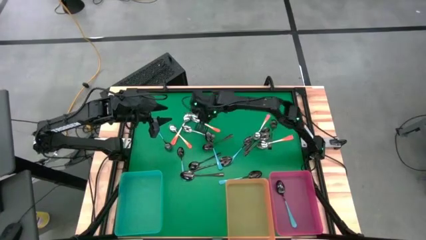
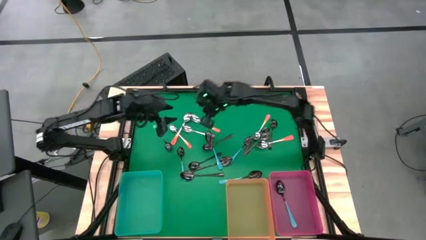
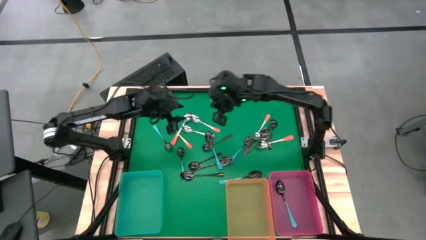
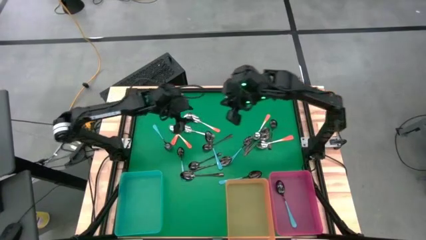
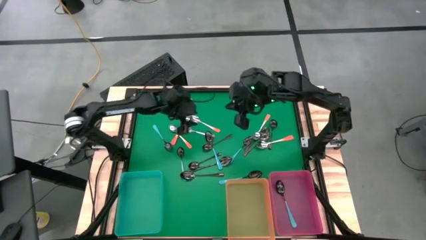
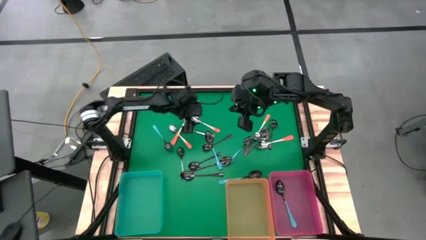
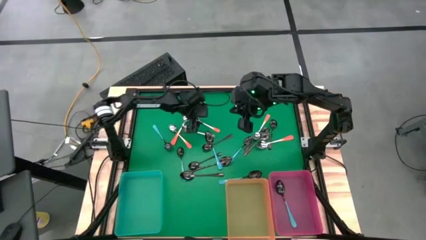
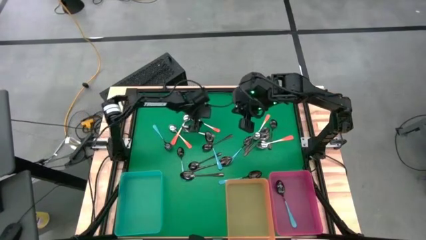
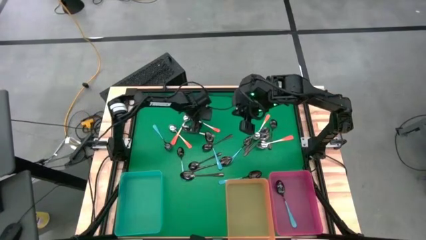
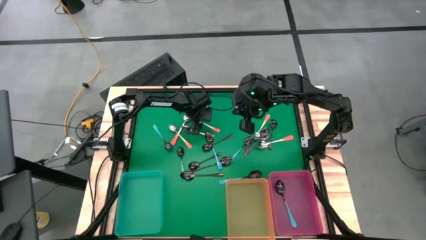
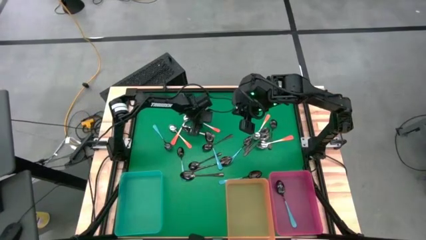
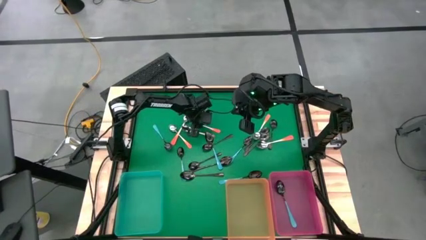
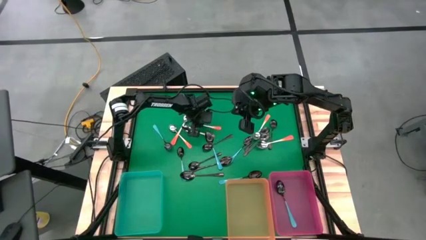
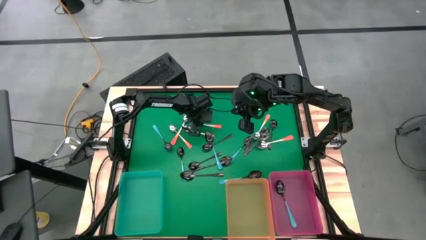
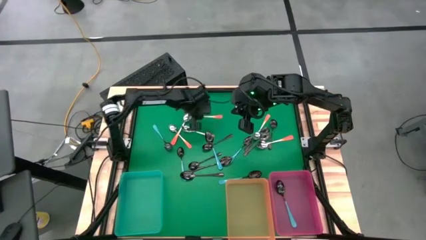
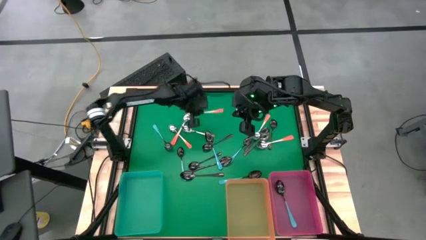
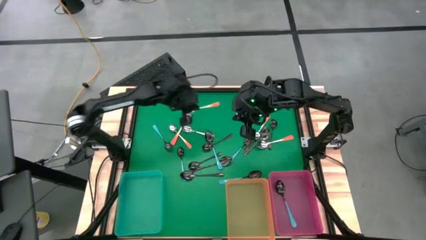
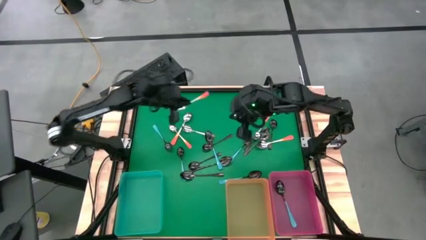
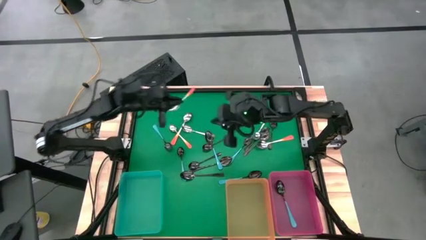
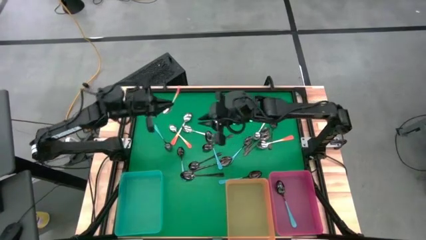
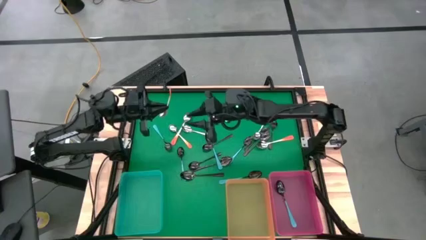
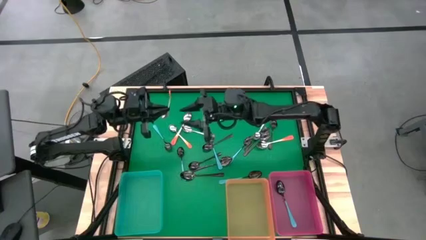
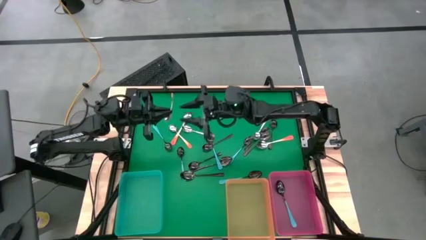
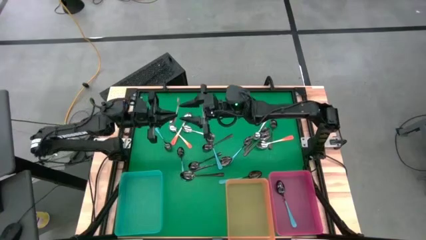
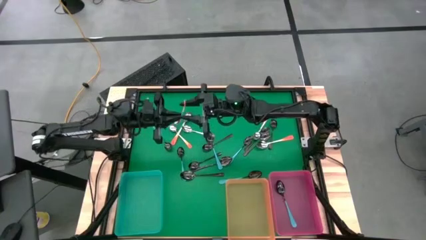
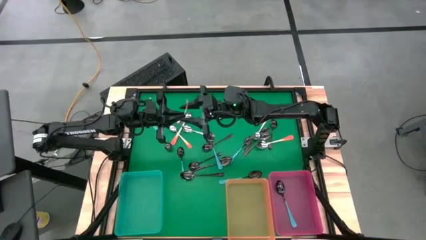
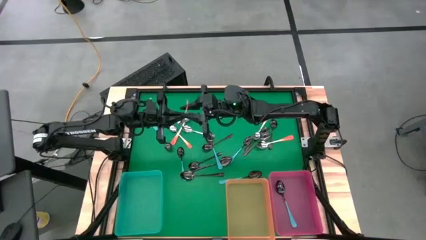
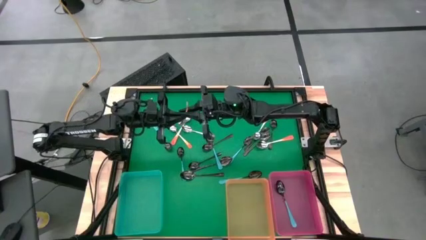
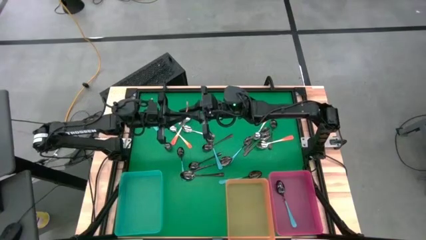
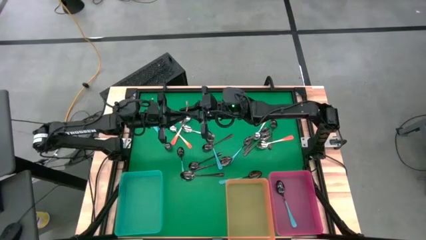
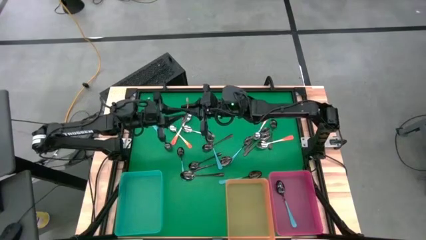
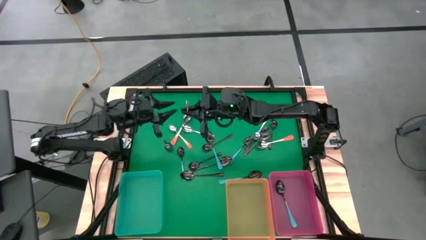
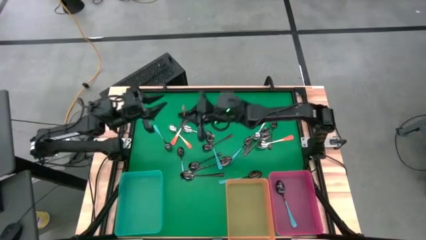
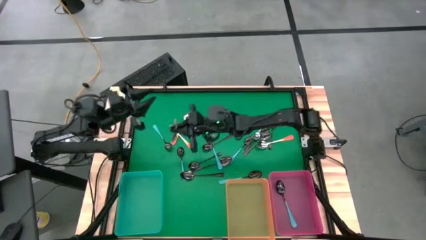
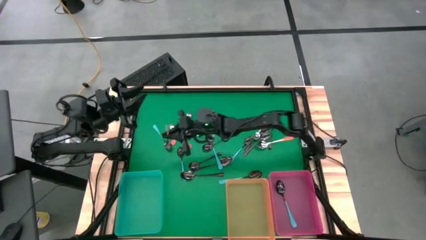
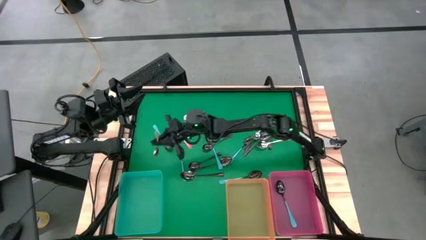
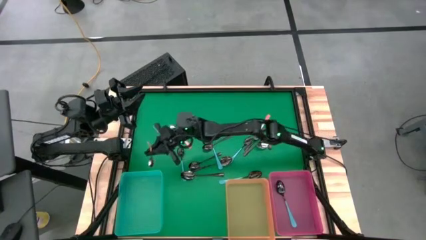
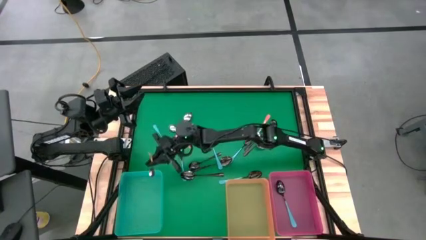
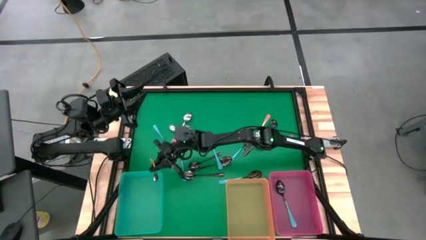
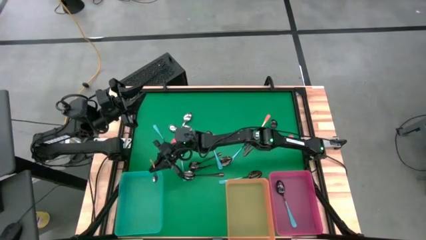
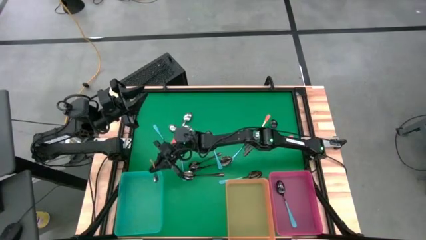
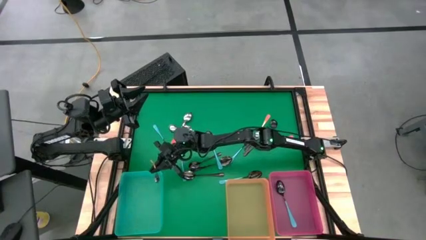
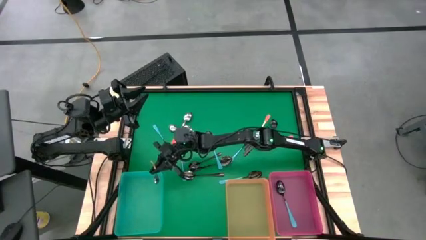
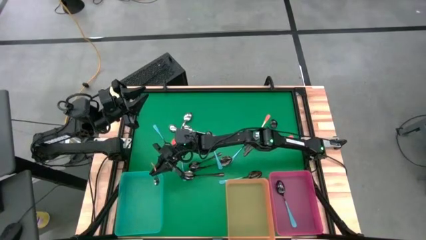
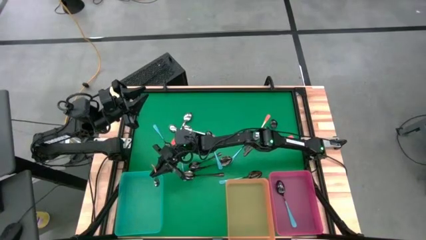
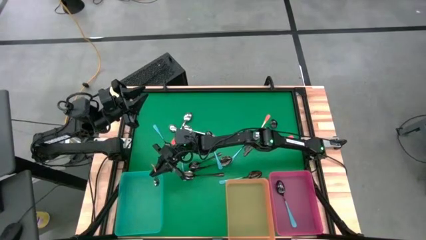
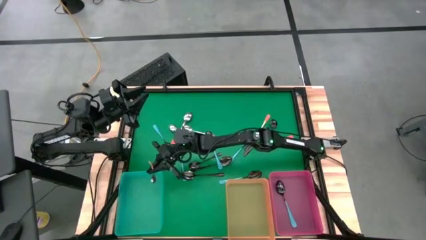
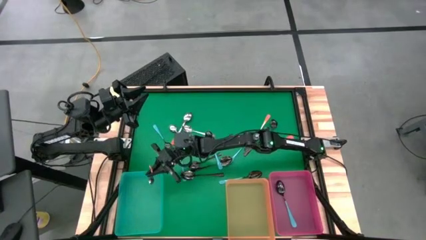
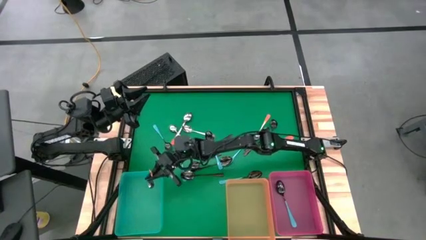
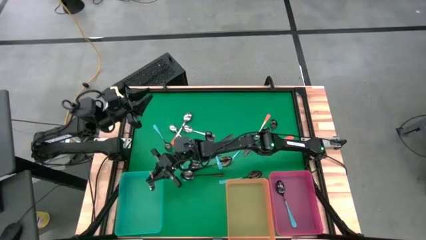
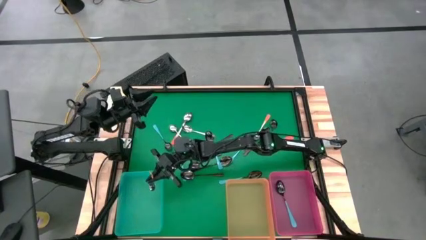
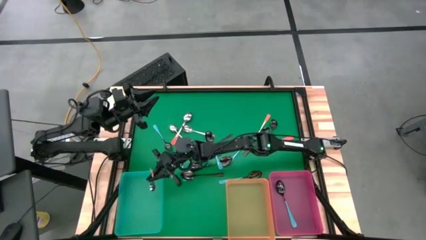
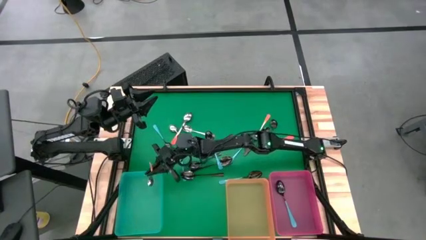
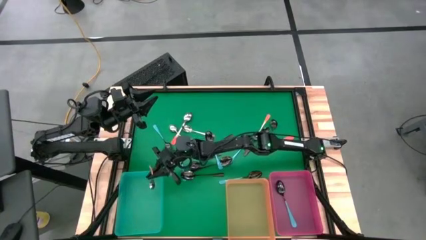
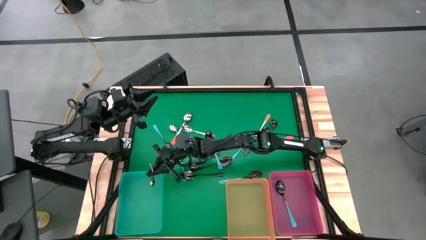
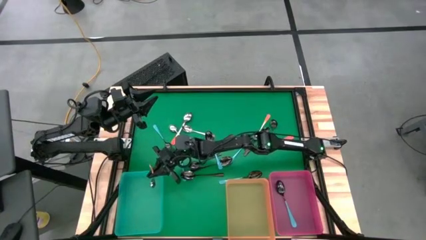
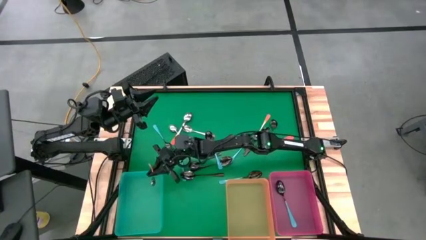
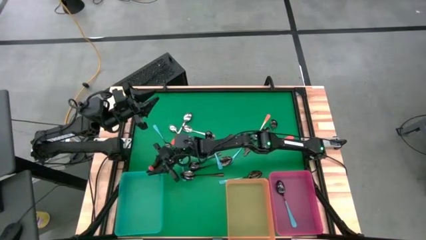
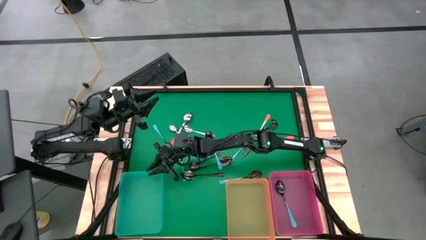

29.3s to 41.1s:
Task: Sort silverware by color (type)
Put the orange spoon into the green bin
